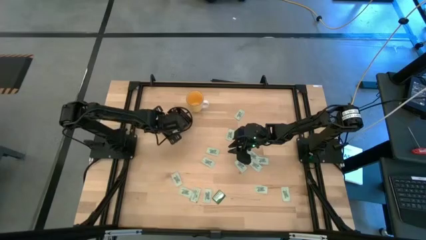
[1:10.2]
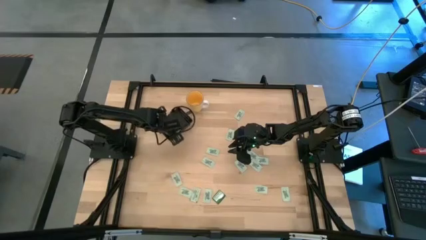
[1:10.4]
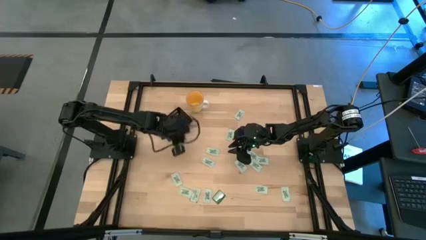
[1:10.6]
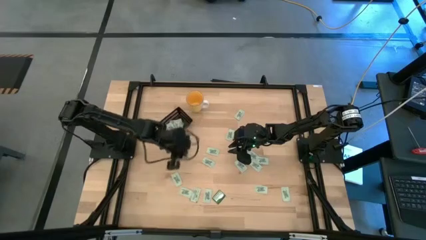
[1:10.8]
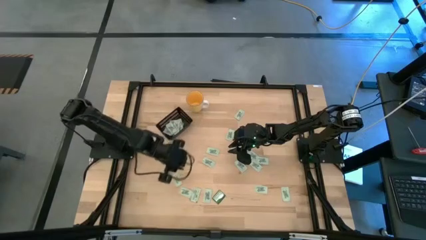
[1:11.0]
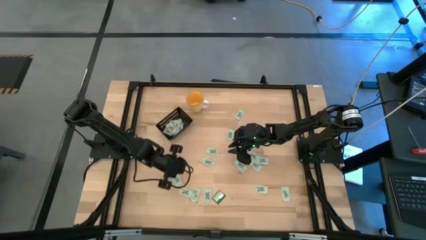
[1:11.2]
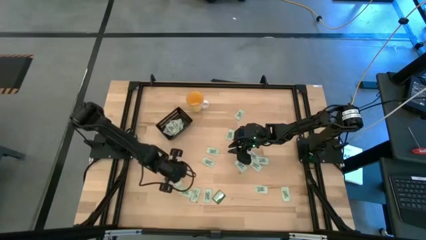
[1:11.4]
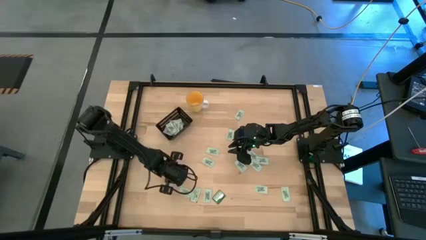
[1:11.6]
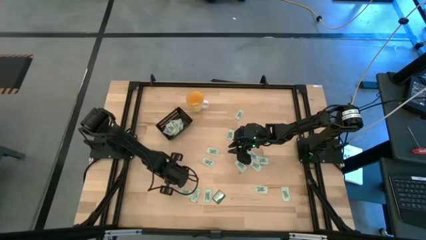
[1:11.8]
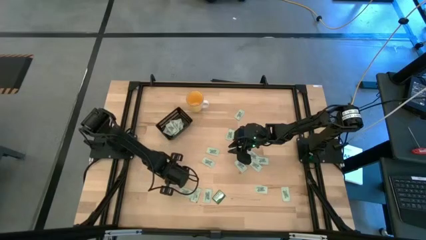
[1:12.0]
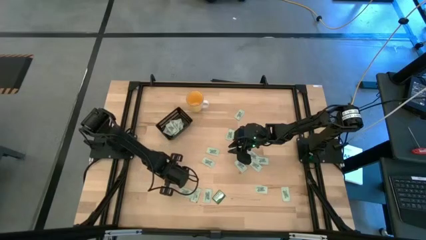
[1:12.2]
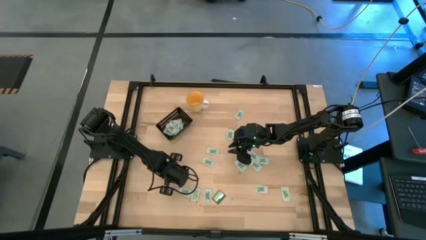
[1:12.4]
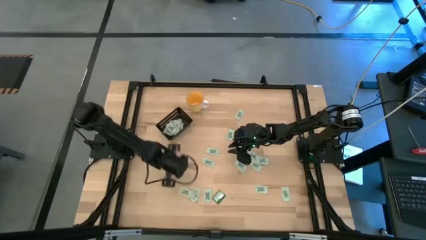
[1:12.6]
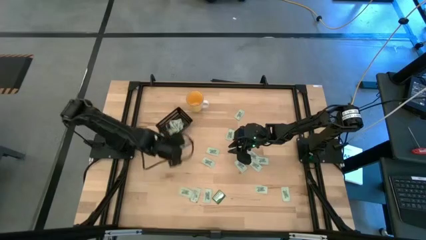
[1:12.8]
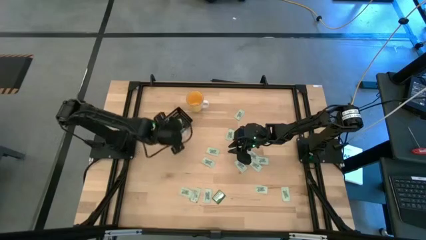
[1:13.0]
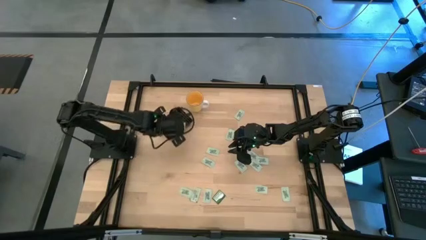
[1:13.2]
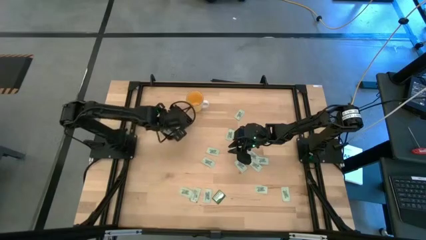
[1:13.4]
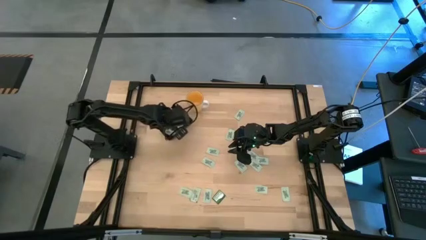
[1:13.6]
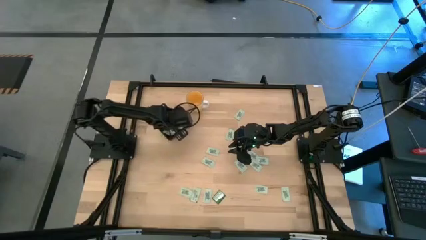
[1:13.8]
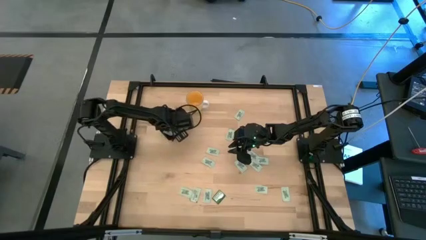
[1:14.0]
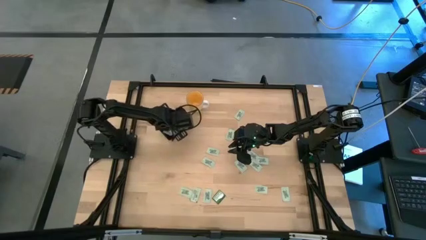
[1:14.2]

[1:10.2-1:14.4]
Task: Pick and place Stevia / Truvia into bins
Put the green stevia packet into the black bin

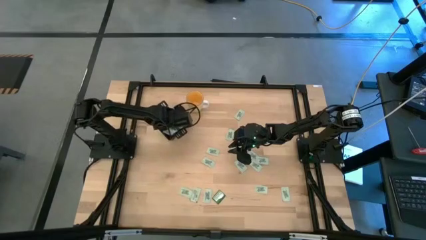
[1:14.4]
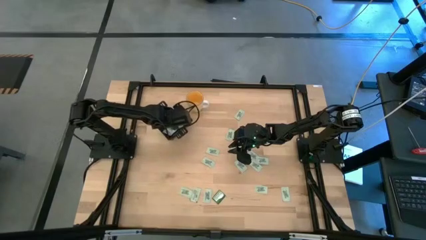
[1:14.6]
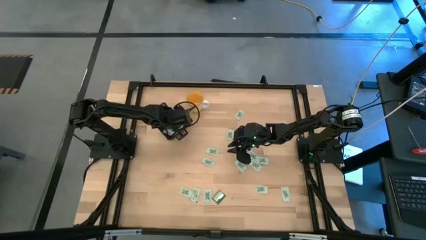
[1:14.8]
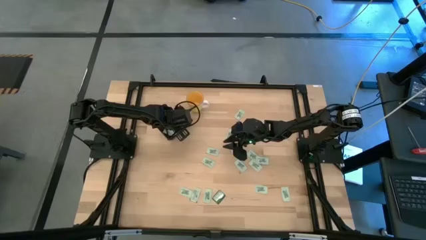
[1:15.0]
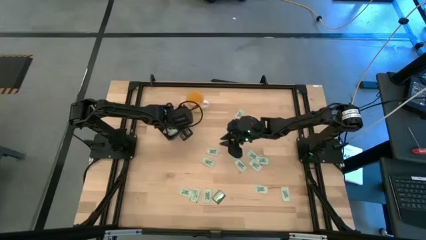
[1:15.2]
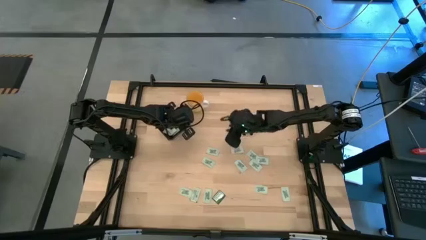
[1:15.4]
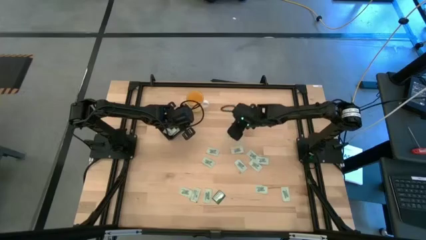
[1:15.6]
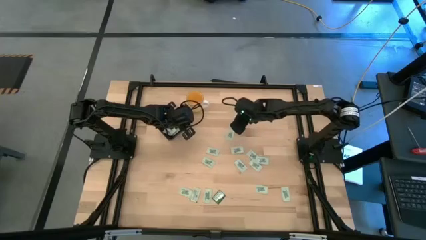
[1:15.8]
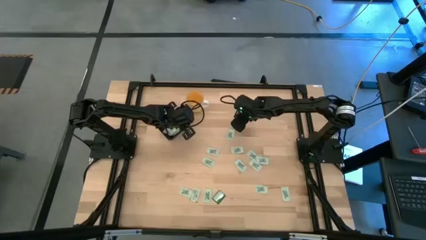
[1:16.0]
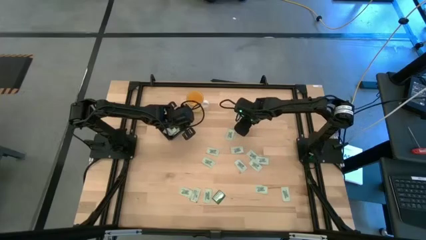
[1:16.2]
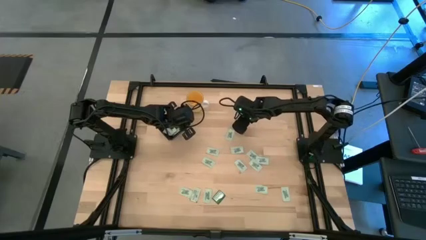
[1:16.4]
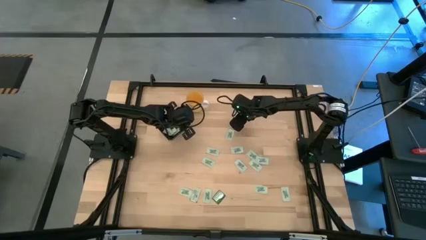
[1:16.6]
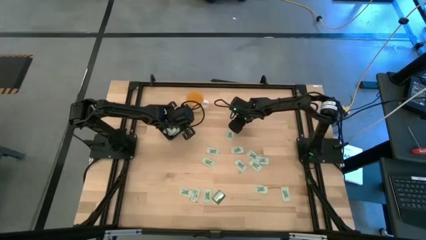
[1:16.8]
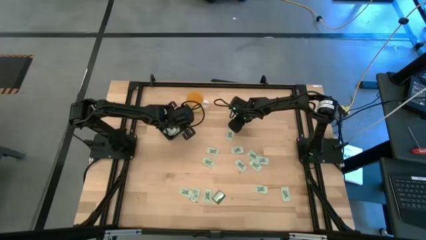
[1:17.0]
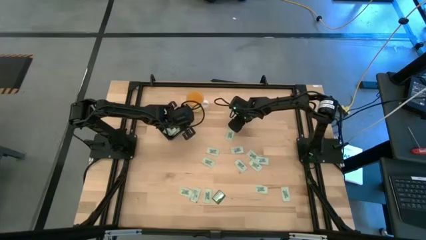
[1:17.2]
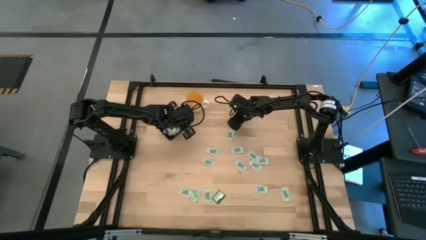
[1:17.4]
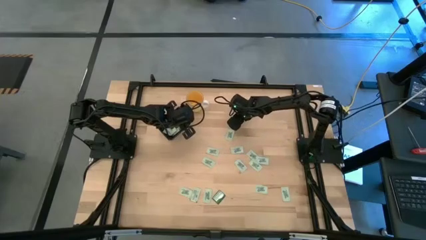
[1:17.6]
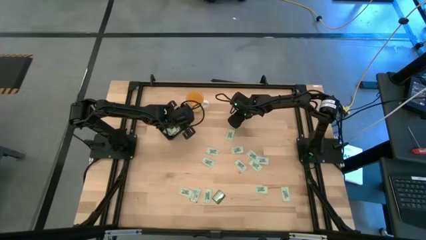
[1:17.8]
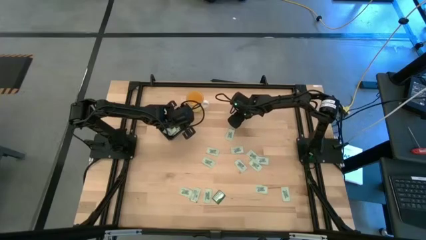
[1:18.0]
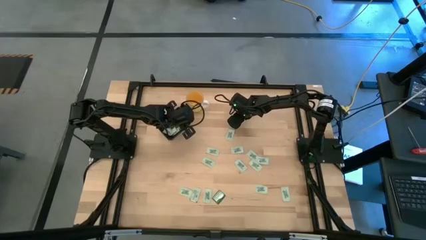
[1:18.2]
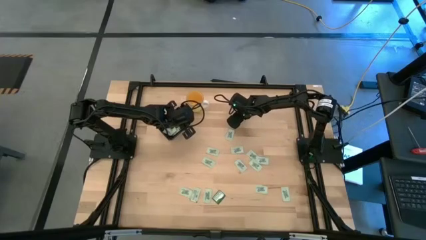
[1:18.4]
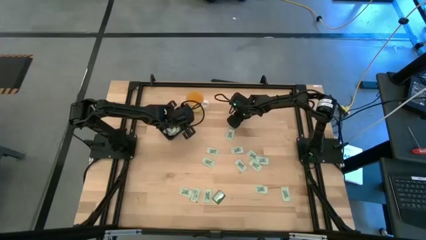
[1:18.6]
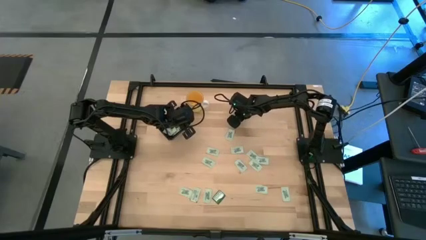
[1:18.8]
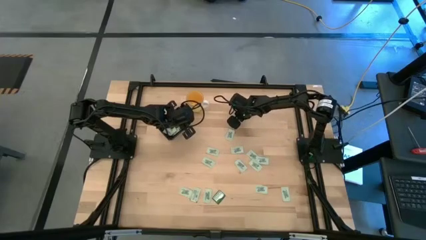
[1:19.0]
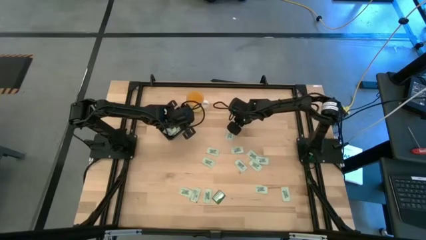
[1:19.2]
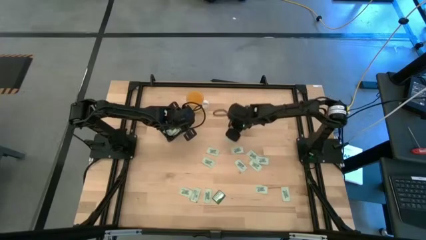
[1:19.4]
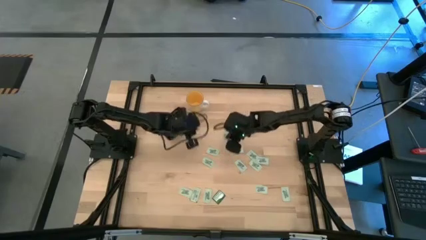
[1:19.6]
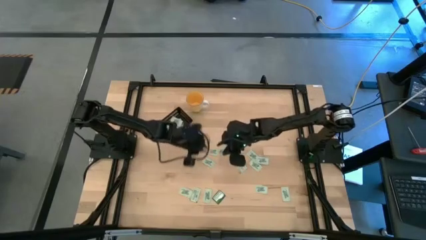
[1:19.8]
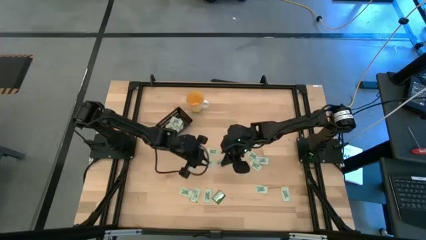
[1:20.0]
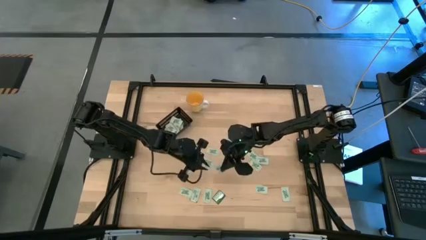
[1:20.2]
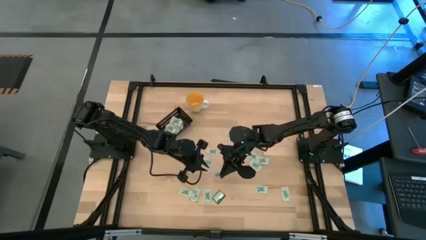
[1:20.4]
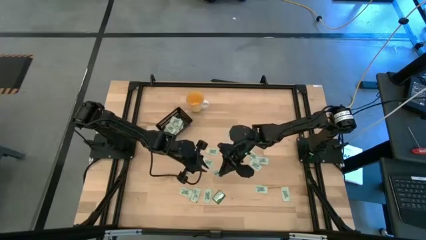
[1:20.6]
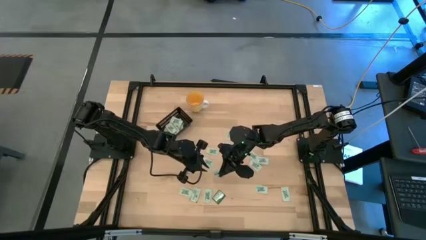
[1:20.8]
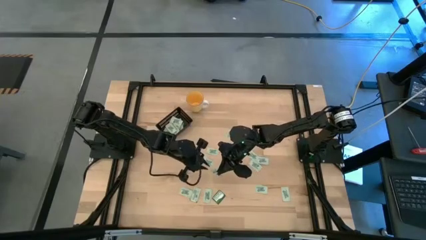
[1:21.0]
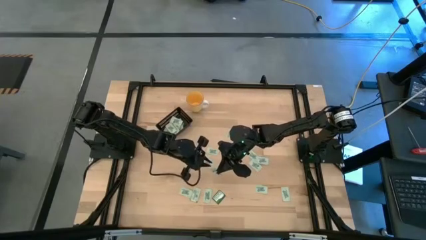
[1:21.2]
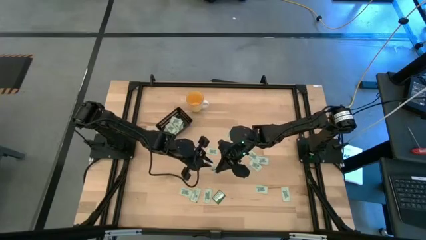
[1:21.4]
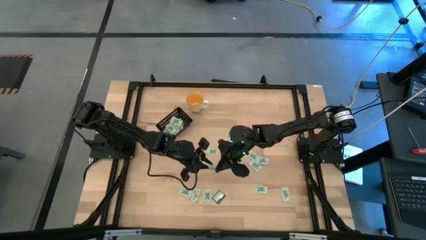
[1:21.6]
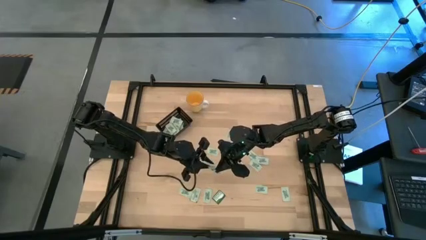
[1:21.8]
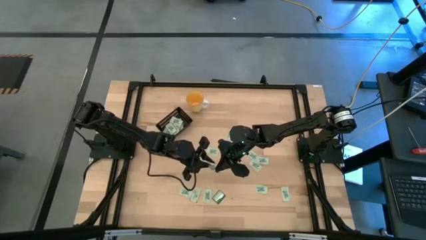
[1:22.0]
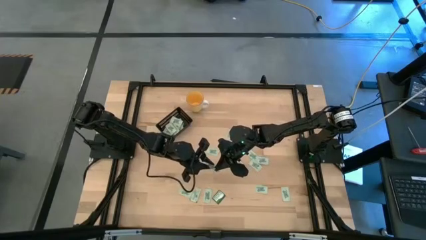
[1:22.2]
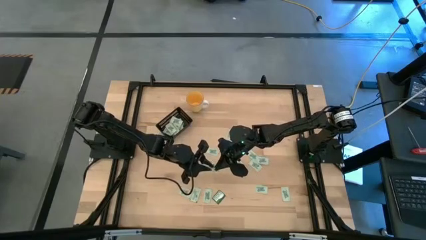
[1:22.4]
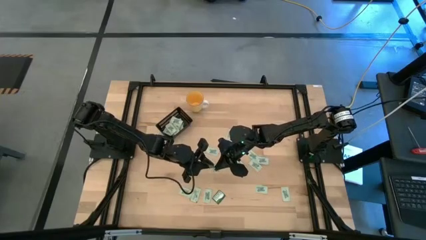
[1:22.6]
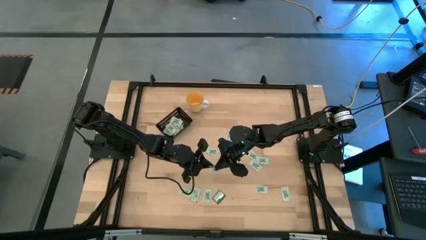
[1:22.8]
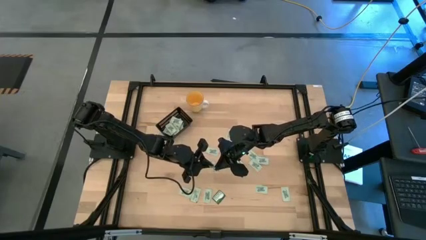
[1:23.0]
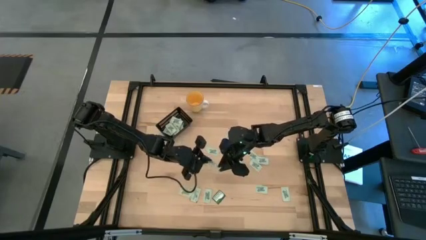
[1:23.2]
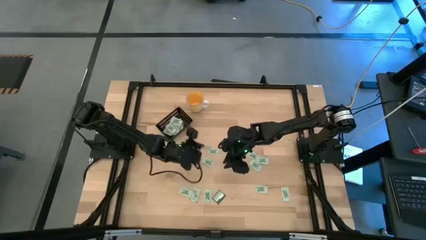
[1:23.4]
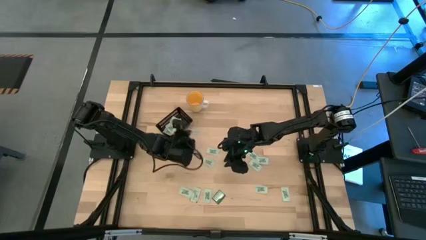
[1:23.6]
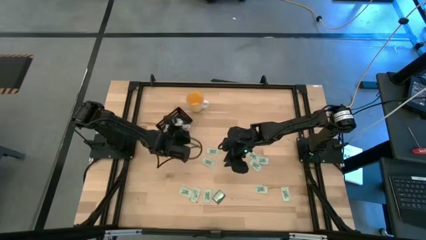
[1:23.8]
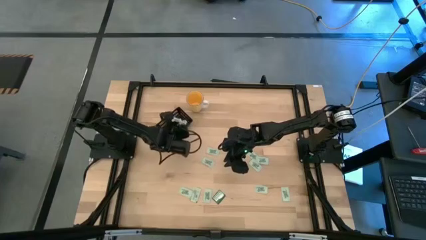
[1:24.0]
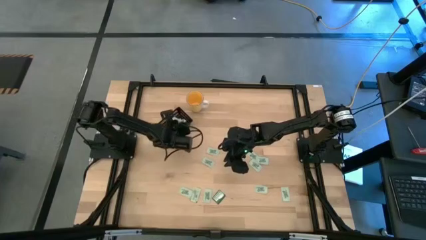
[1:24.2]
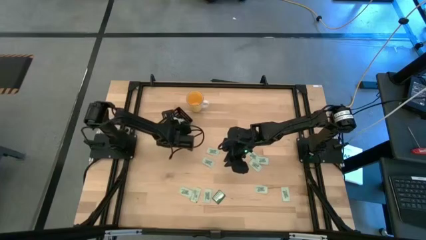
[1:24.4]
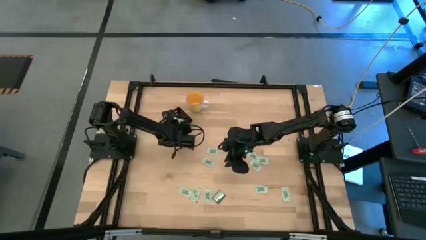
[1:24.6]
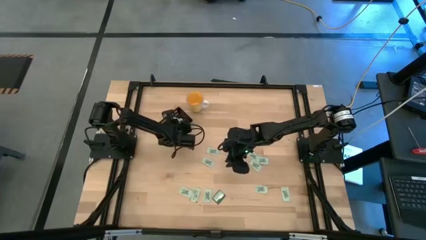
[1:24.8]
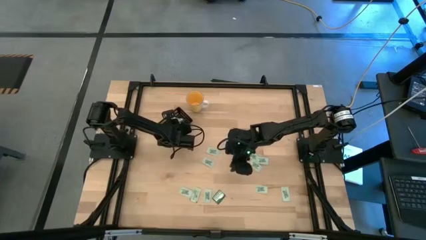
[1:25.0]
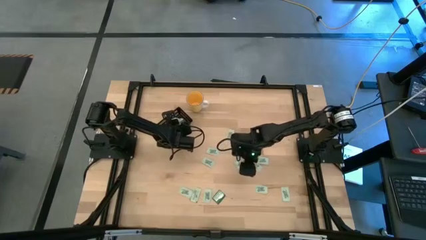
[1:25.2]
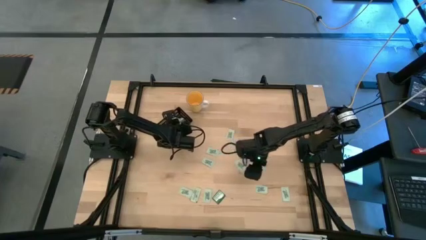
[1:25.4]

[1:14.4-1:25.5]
Put the green stevia packet into the black bin

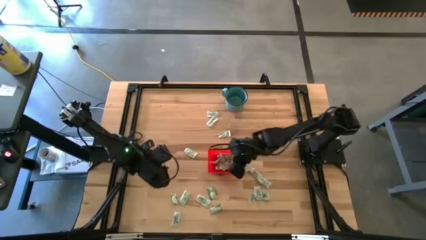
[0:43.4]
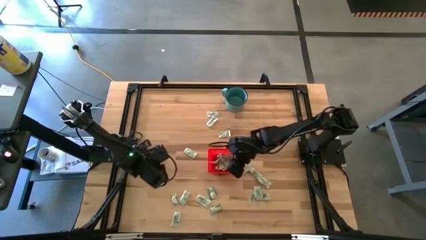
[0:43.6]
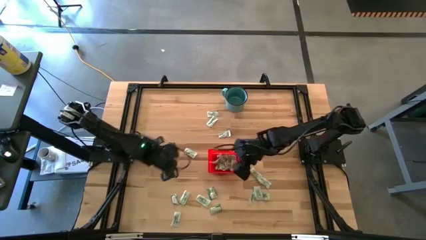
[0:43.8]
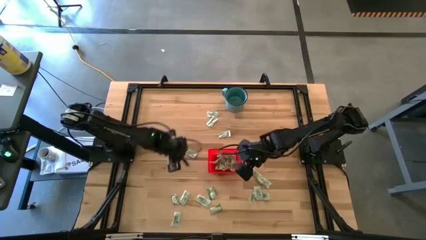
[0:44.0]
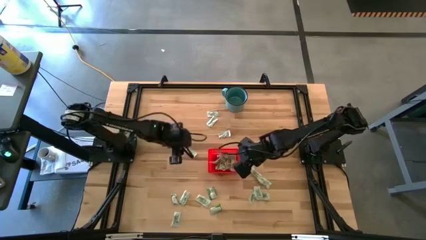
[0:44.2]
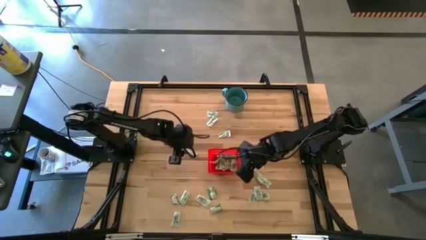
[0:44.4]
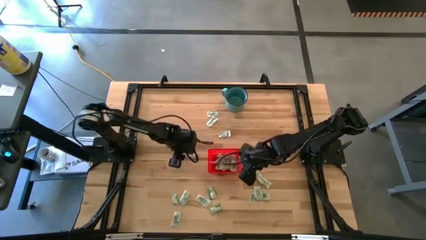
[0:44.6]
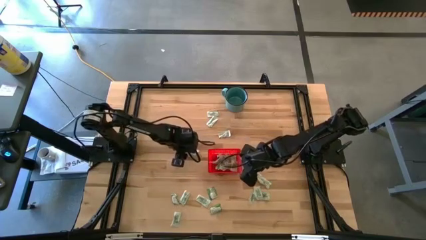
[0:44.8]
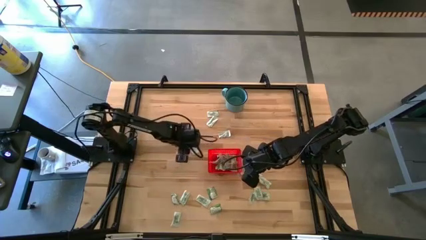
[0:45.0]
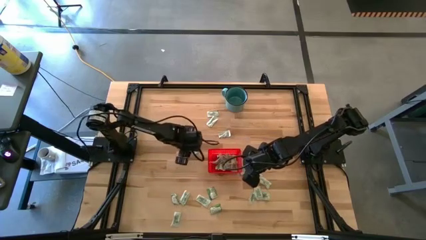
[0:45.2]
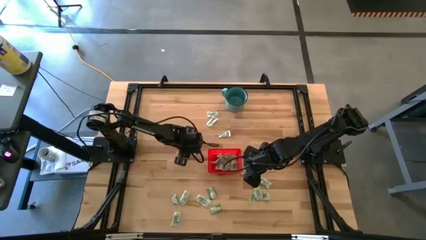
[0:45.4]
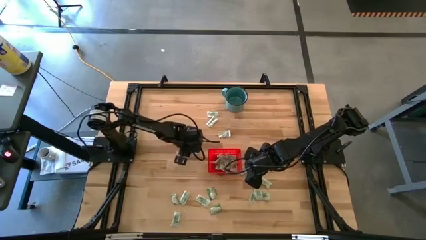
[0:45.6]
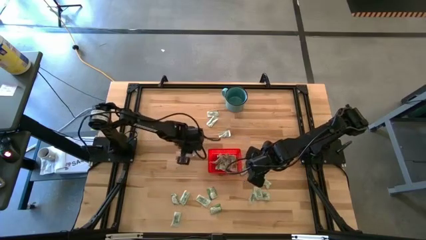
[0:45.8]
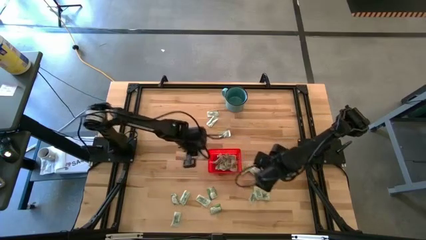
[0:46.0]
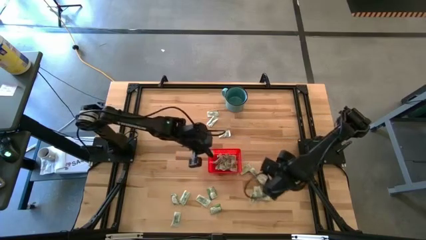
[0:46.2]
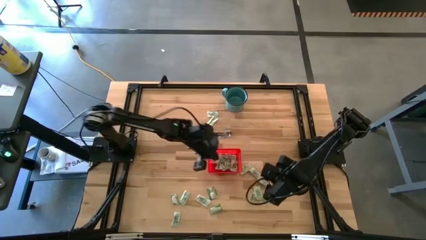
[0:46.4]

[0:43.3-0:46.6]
Task: Pick and place Stevia / Truvia into bins
Put the green stevia packet into the red bin
